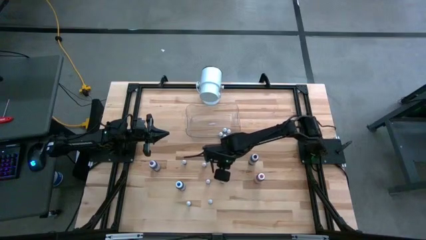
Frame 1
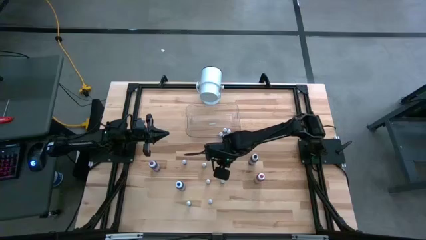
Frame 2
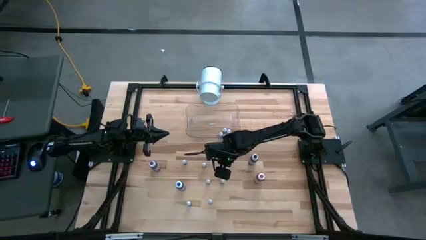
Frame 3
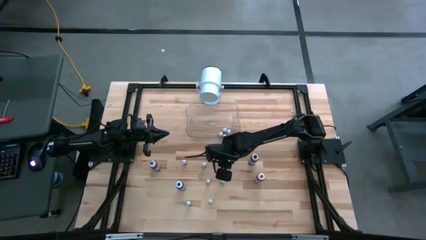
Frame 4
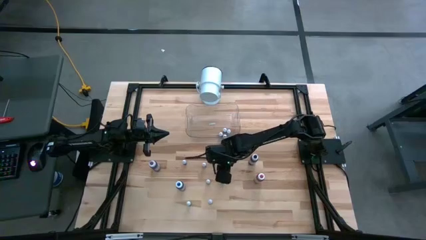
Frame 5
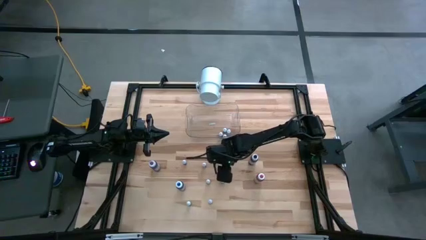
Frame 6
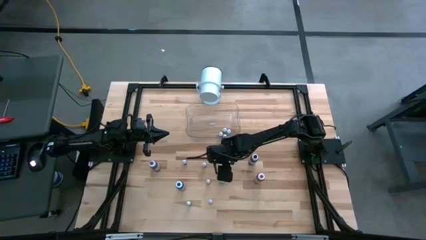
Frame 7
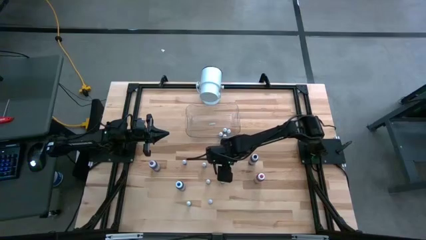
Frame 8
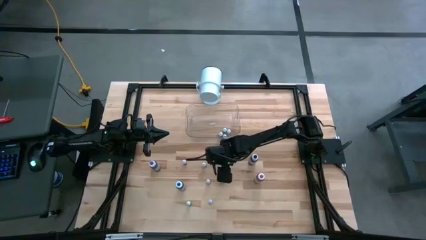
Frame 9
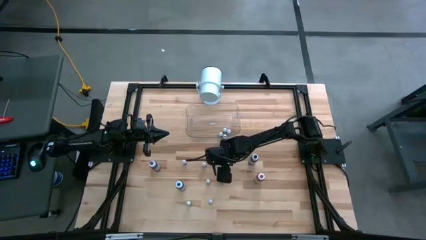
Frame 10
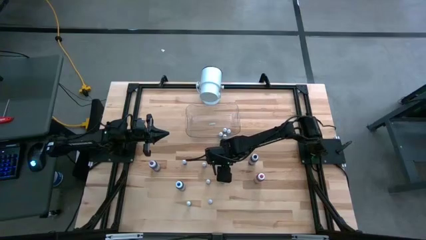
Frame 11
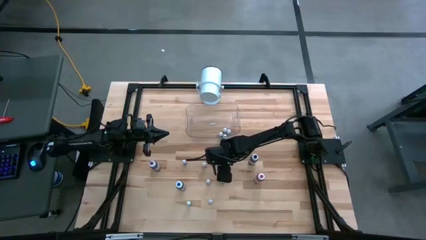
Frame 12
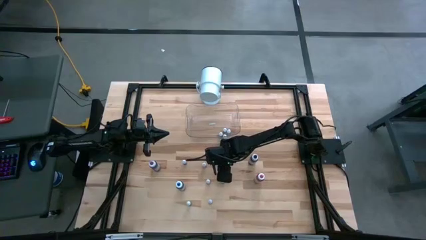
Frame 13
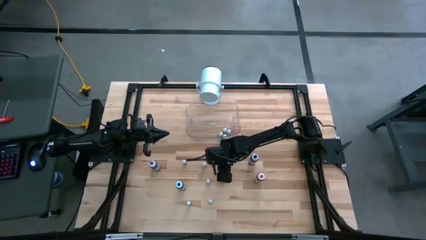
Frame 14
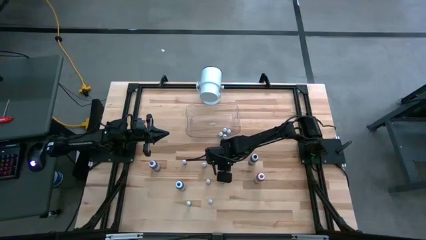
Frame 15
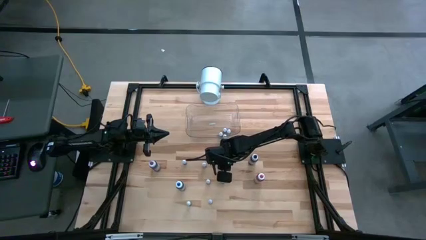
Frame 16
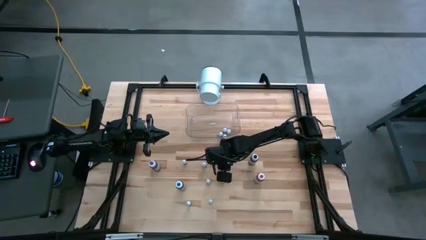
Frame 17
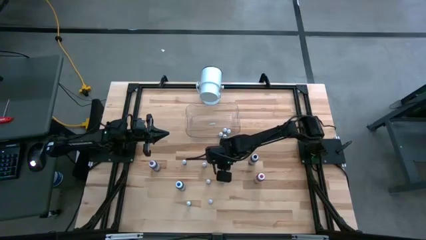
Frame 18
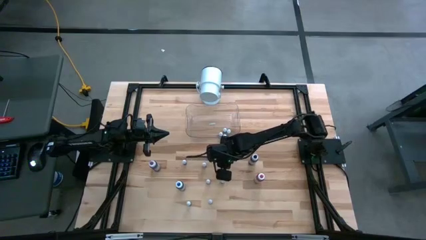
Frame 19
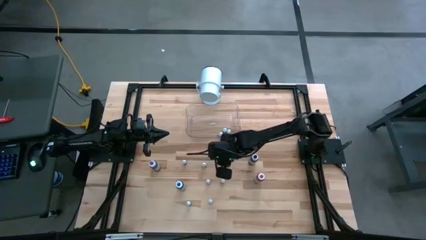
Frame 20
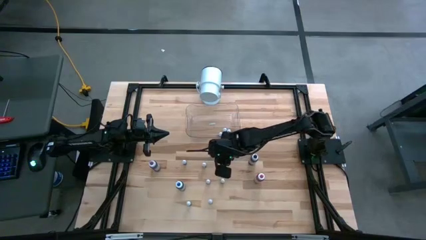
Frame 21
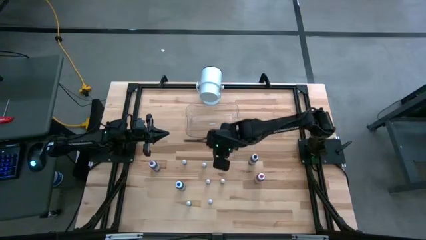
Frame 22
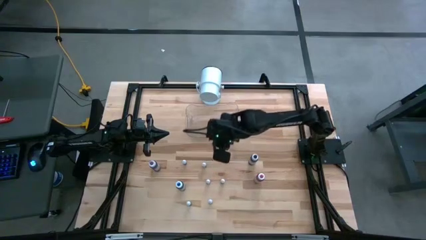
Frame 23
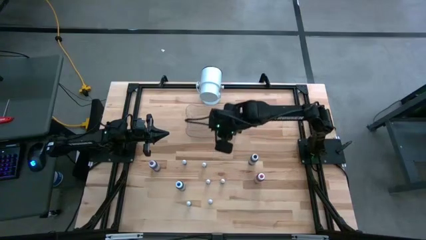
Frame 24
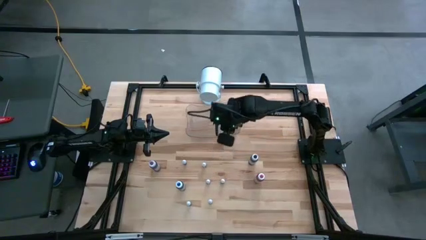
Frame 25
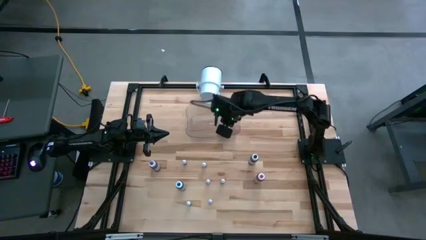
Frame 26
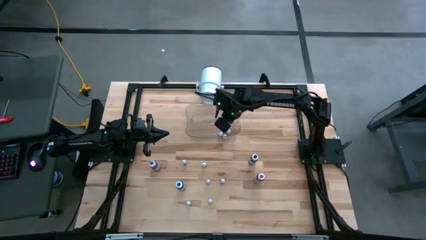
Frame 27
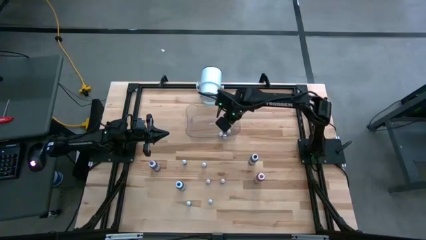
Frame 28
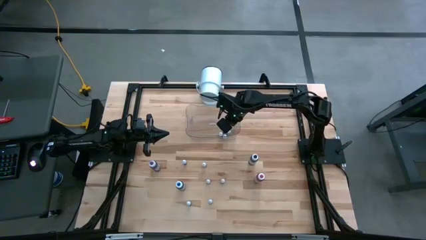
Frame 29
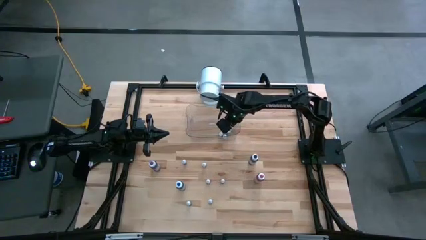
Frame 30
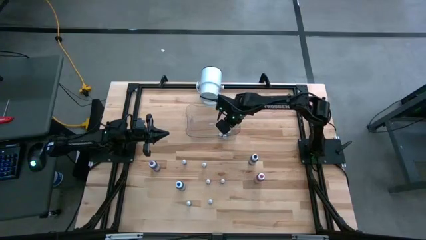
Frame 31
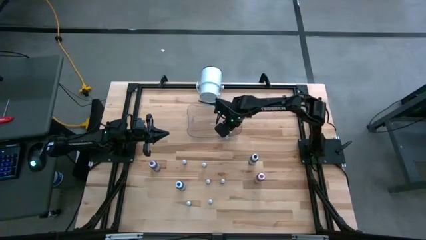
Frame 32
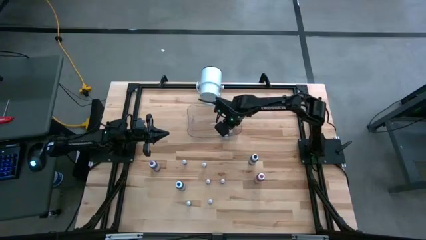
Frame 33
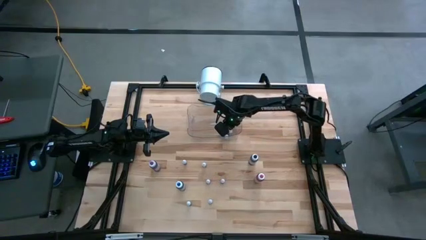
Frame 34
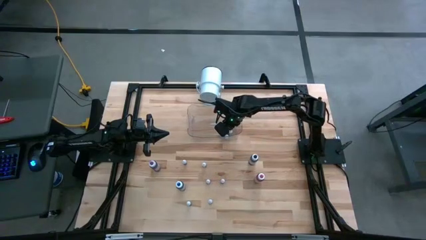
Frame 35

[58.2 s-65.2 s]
Task: Pick & Place food coloring
Put the small black food coloring bottle into the transparent bin

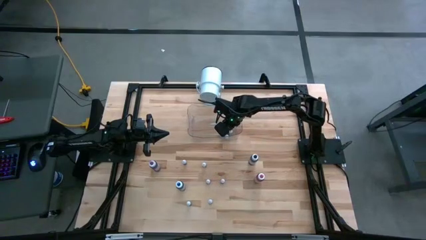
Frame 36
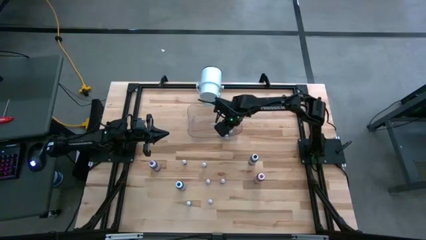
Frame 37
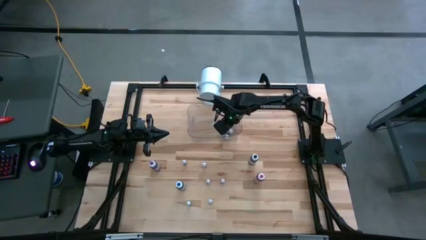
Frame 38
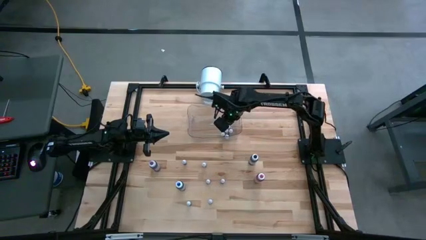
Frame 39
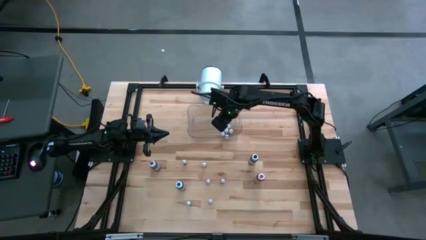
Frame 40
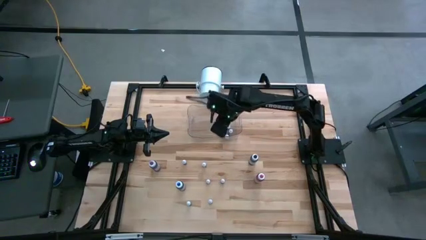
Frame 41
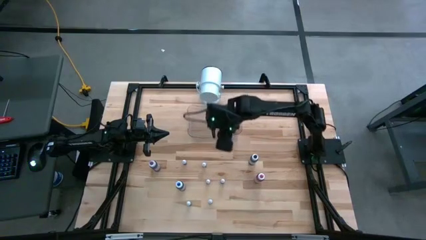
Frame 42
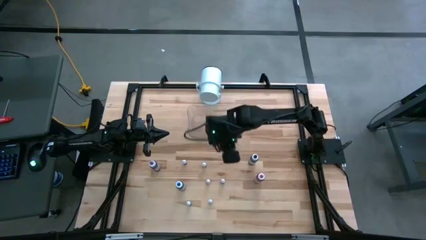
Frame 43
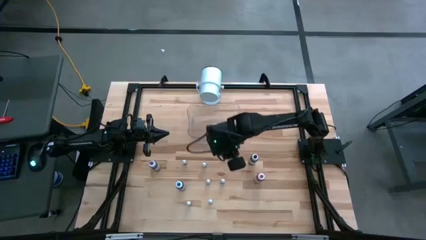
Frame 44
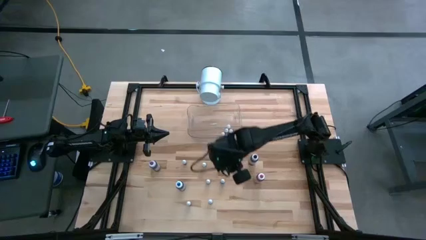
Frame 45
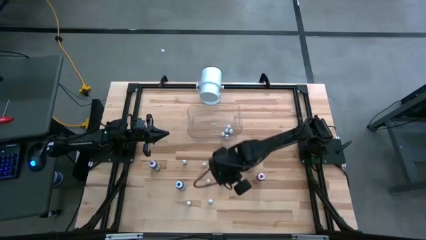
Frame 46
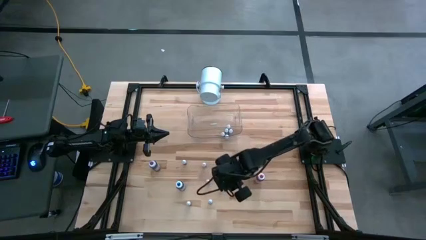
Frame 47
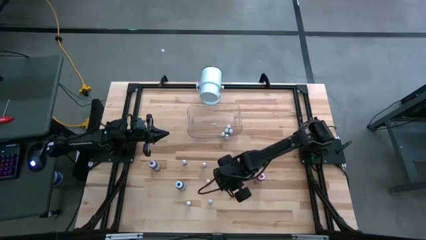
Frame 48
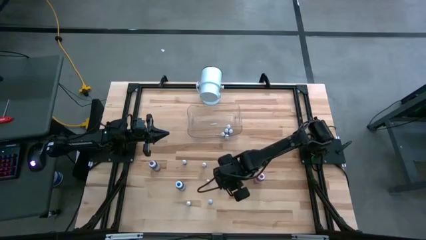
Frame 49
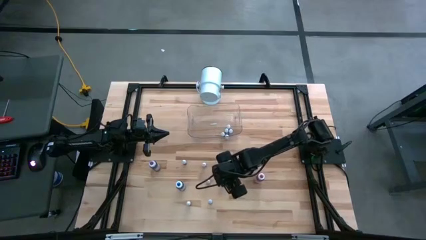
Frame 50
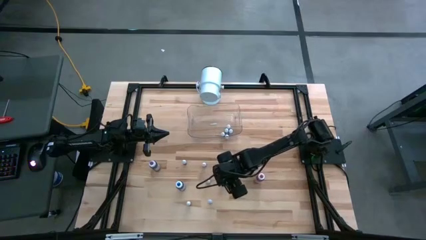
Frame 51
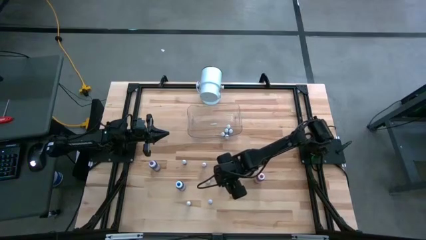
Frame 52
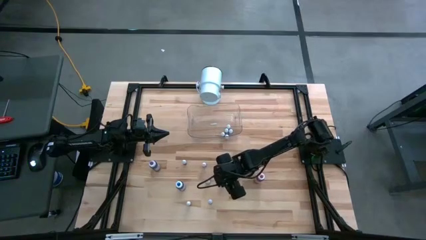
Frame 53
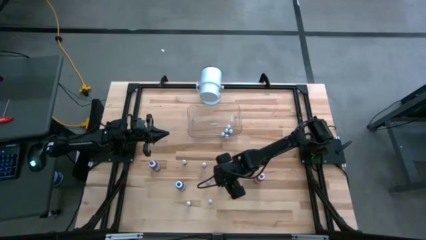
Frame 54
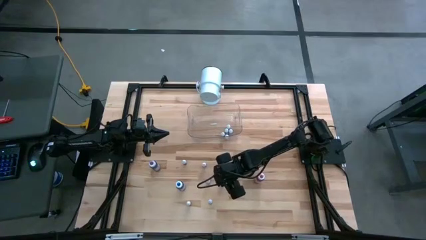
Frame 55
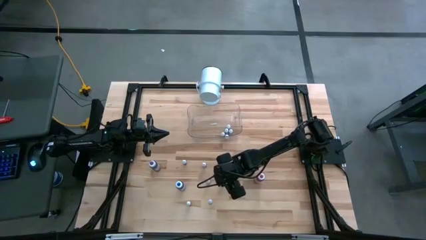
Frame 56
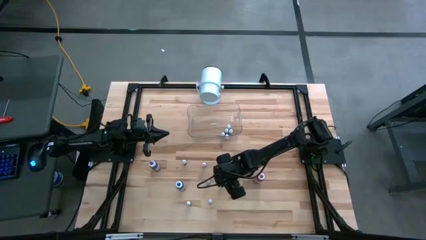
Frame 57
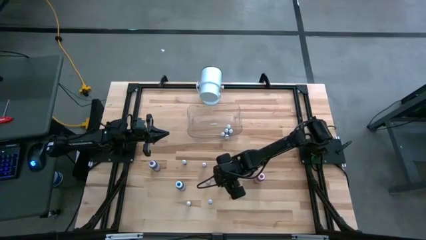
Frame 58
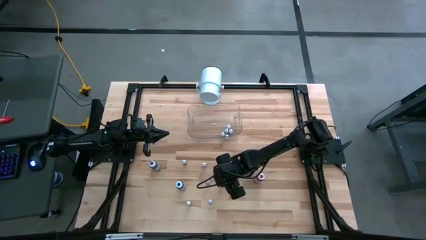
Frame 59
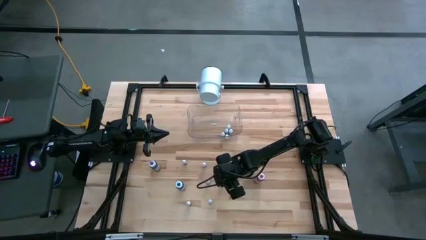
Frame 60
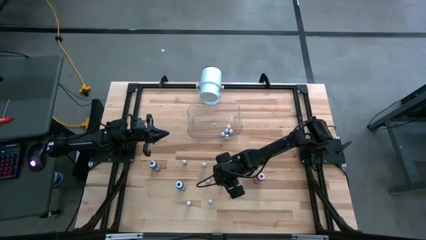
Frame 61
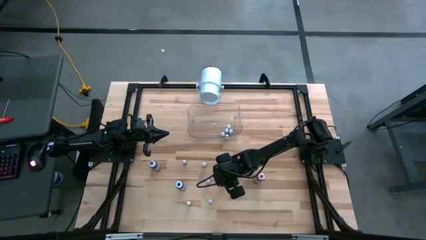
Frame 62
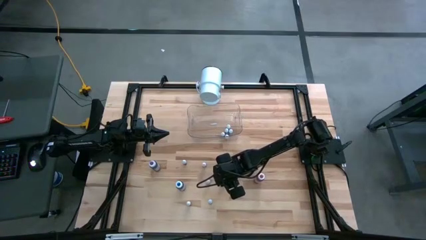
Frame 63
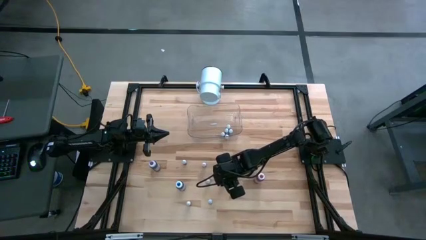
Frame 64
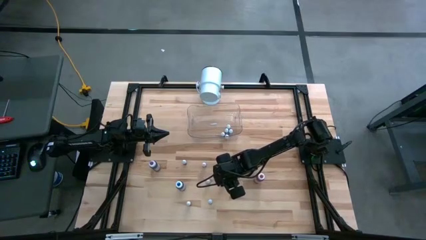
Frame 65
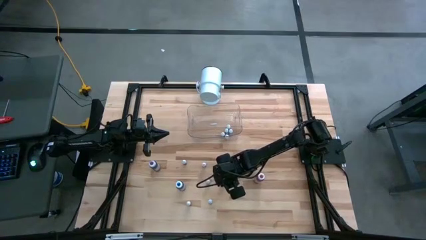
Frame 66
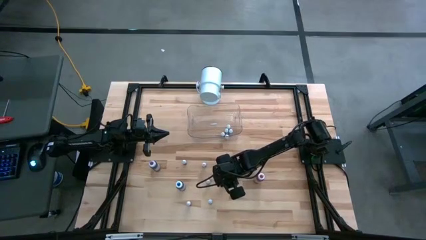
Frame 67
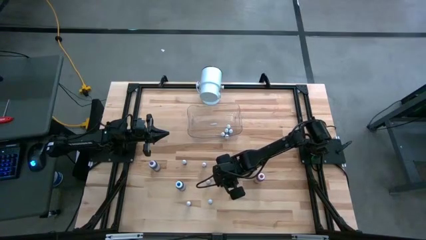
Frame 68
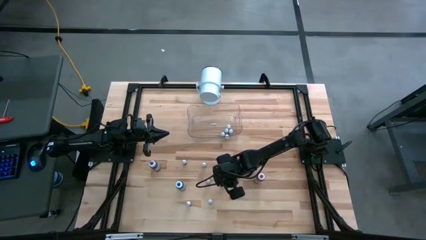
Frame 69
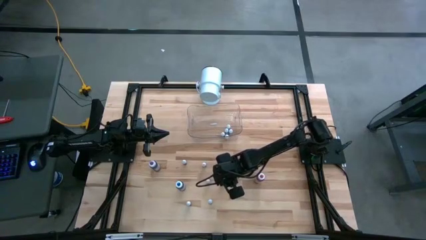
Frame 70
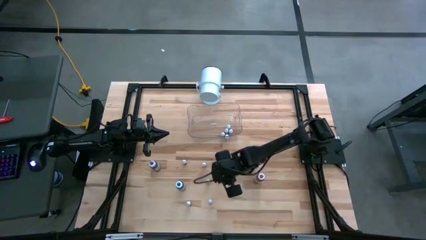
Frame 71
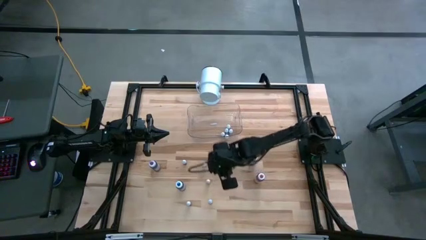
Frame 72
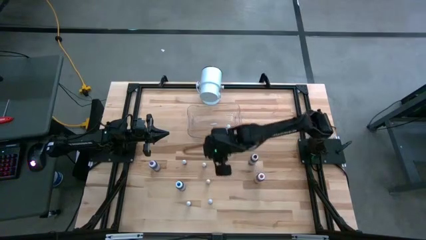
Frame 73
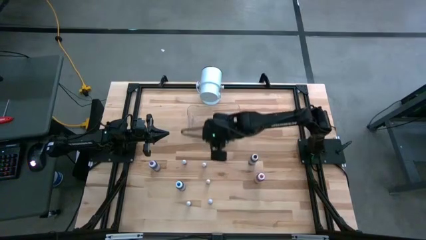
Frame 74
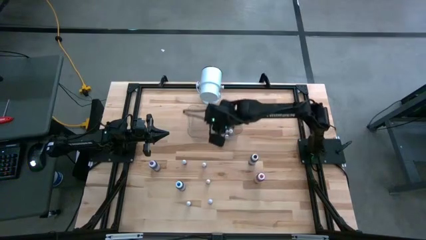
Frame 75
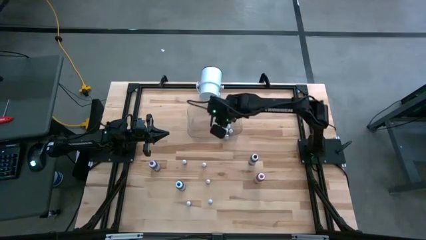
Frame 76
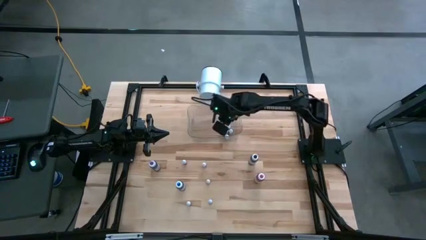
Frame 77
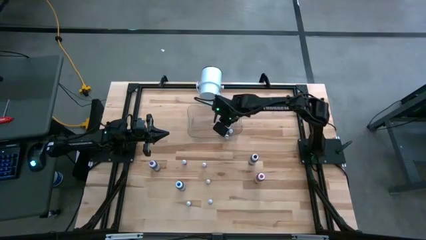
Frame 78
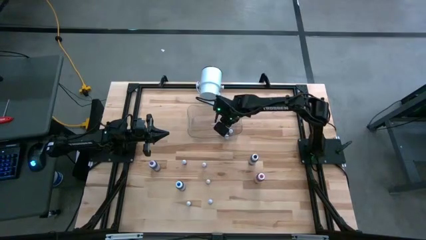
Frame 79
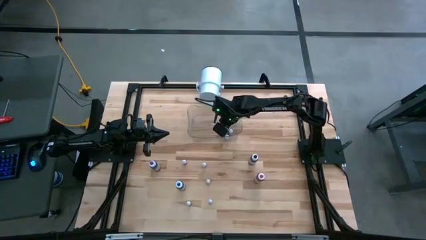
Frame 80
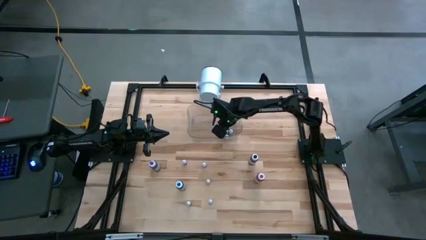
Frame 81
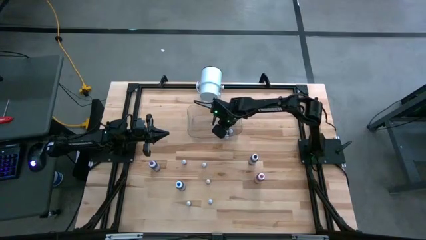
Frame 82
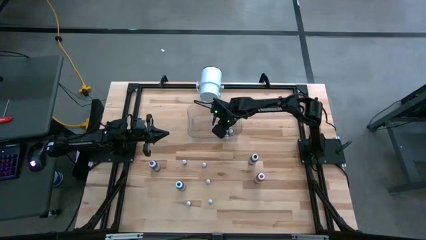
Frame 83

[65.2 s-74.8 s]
Put the bottom small purple food coloring bottle into the transparent bin
